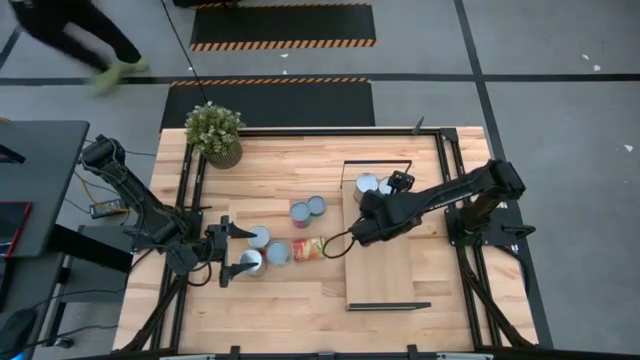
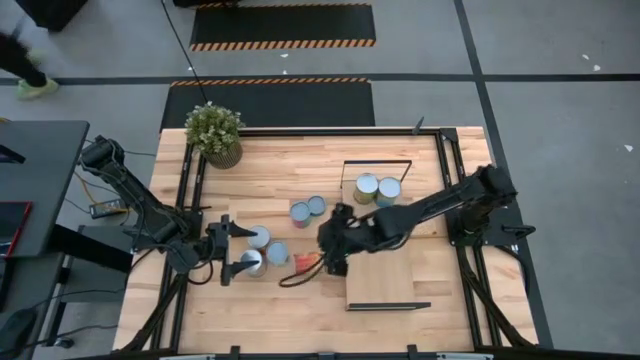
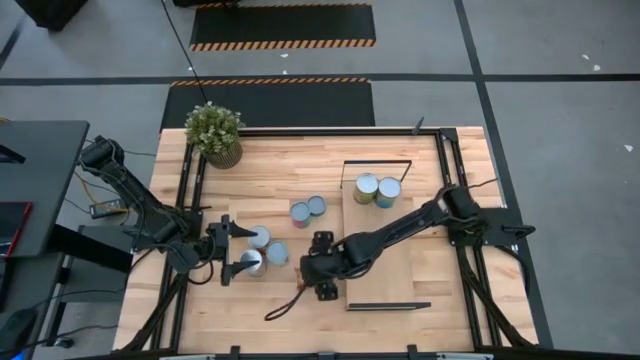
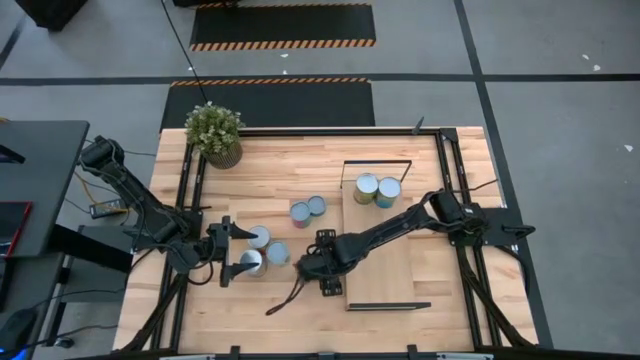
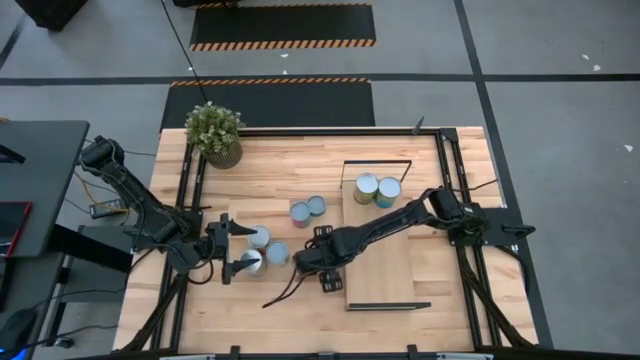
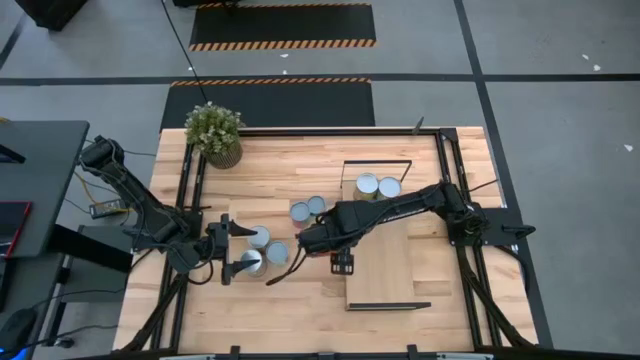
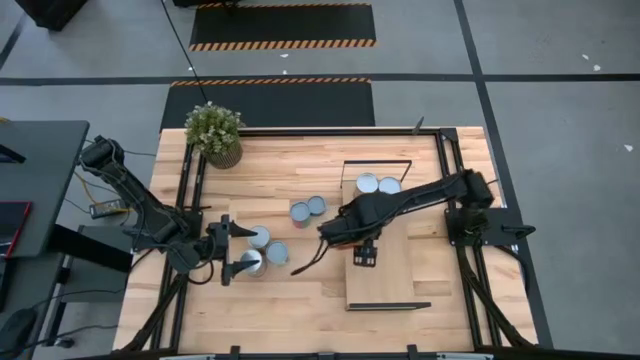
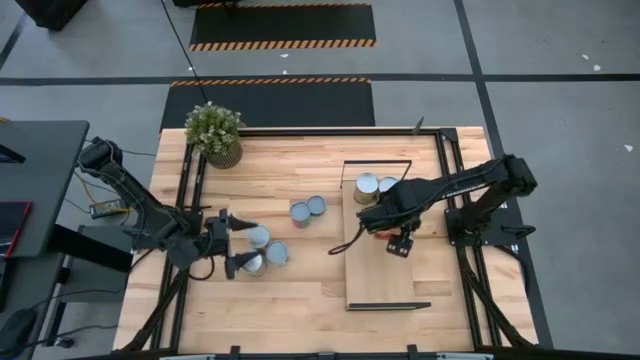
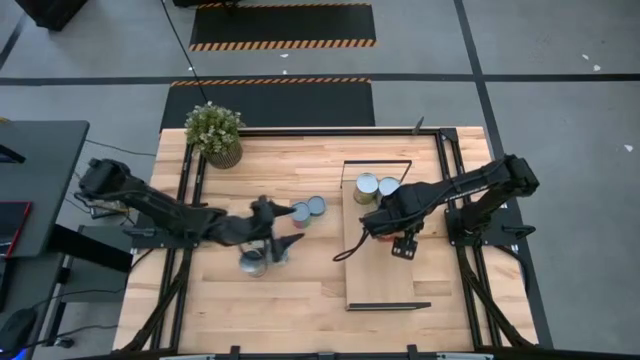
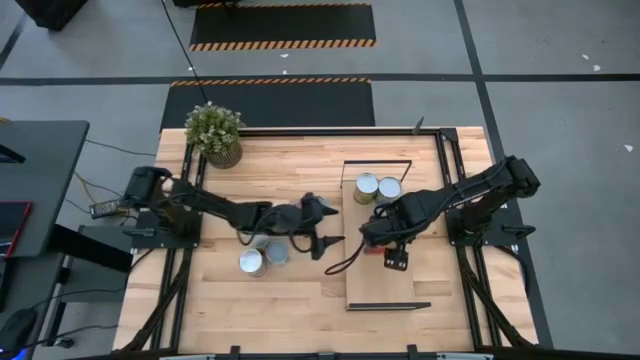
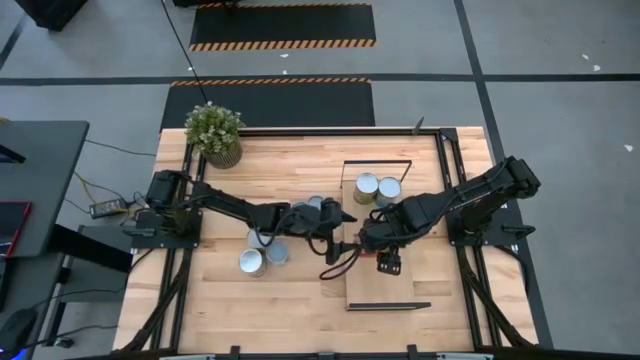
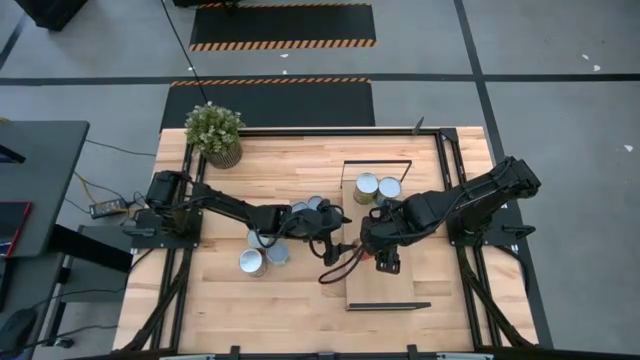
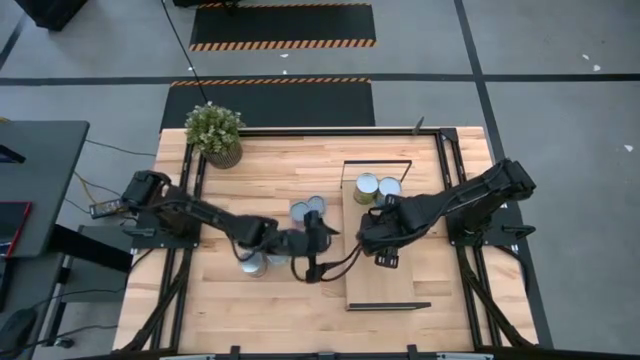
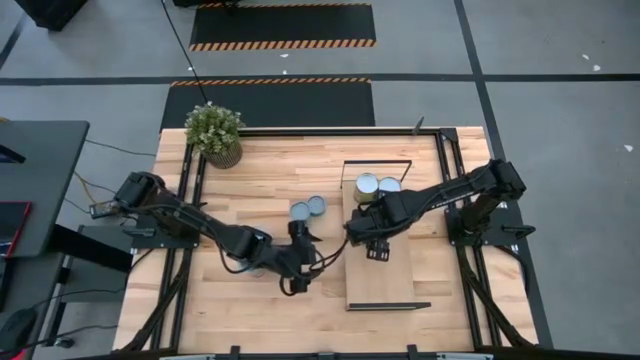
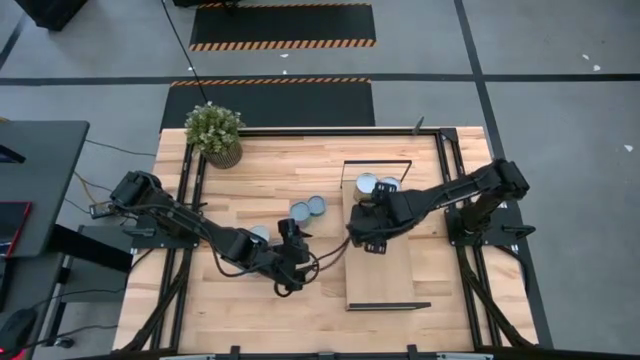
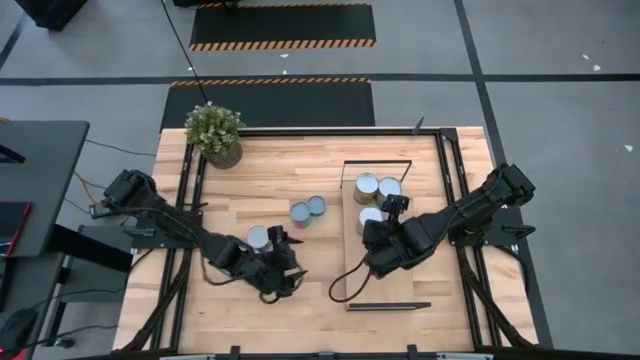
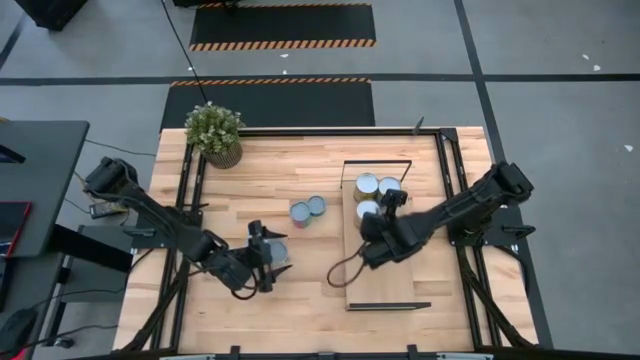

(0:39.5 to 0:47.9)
Task: Pick and place cans onto a shelf
Put the canned corn on the shelf

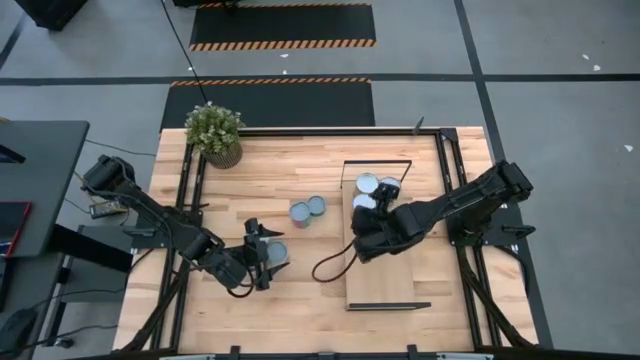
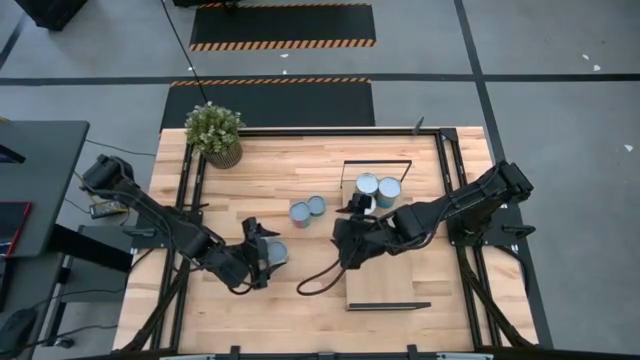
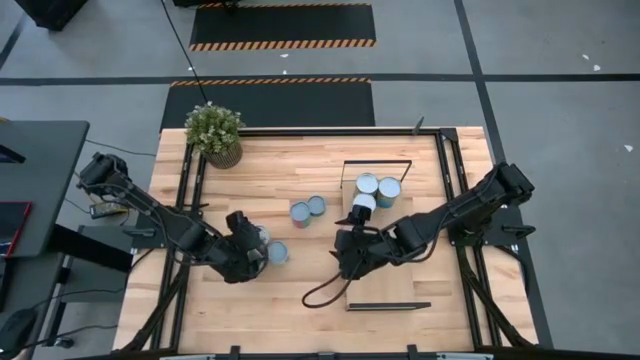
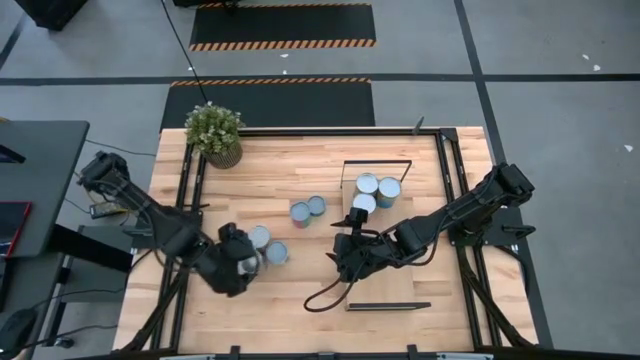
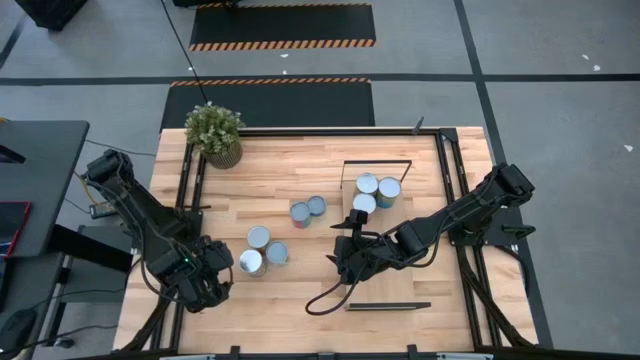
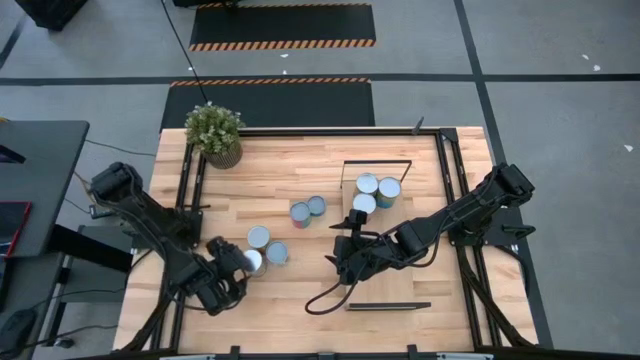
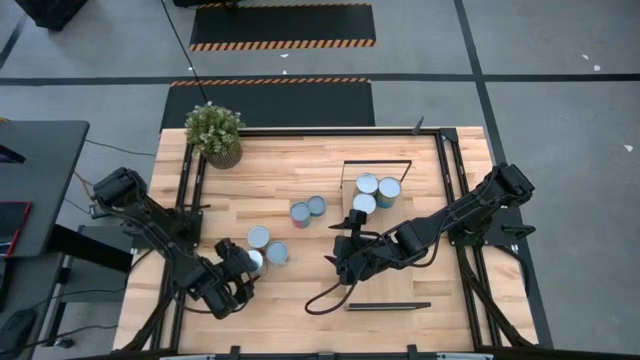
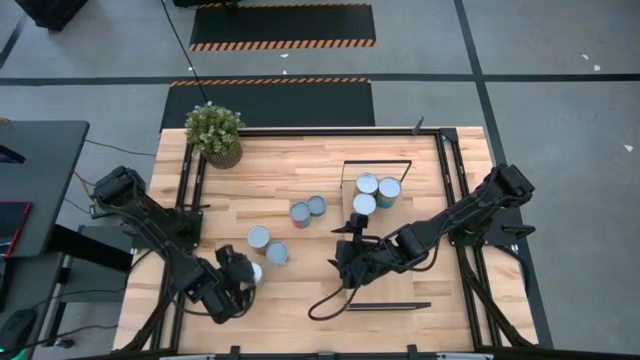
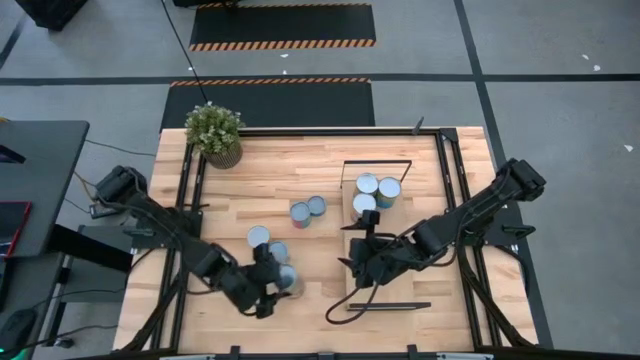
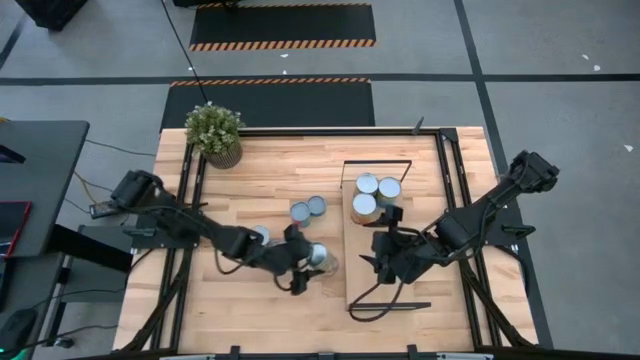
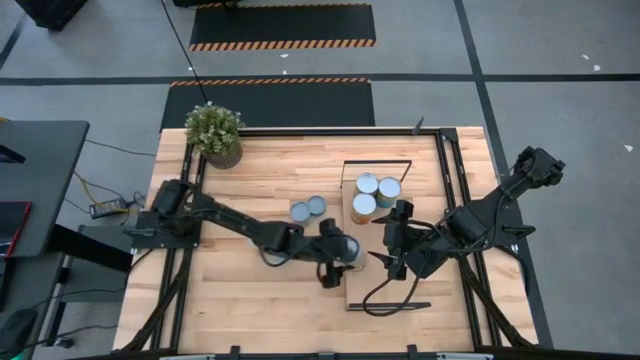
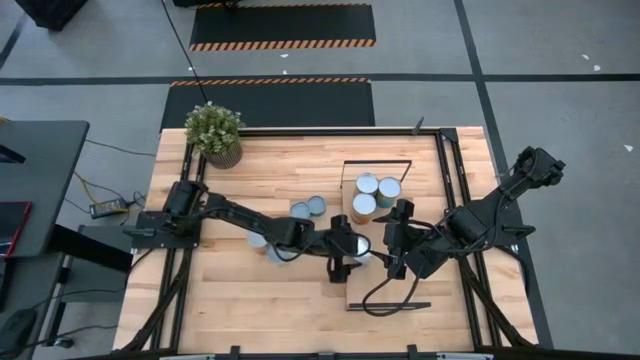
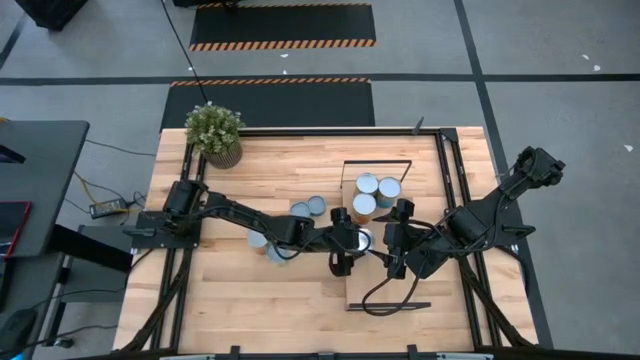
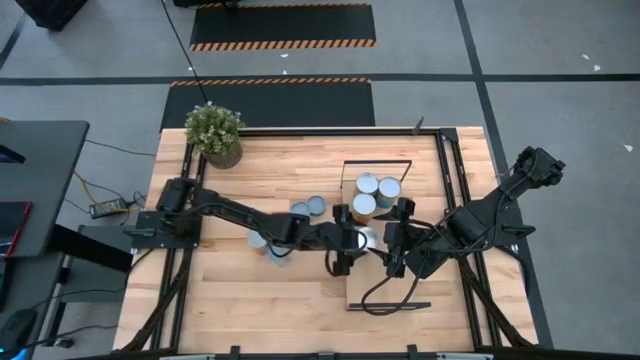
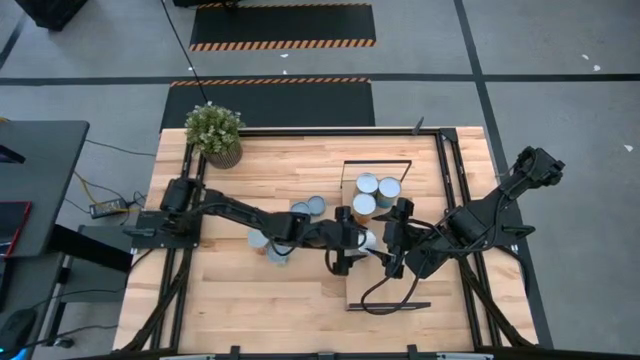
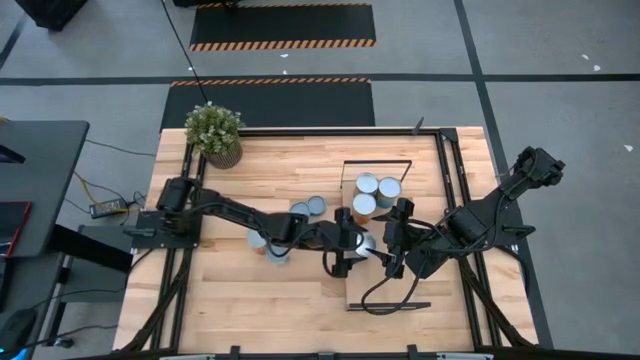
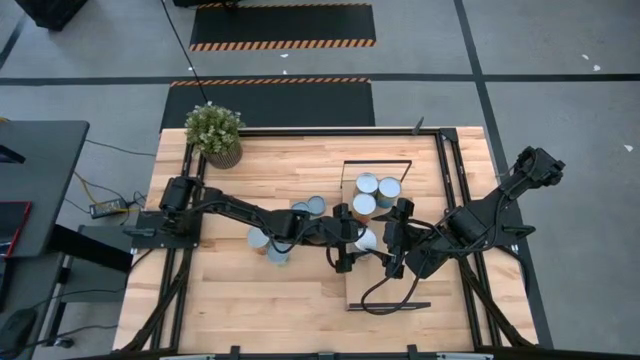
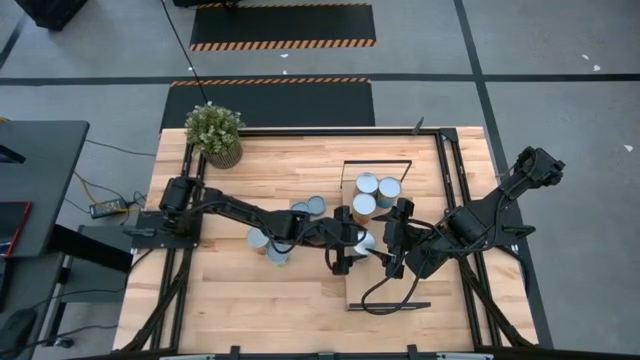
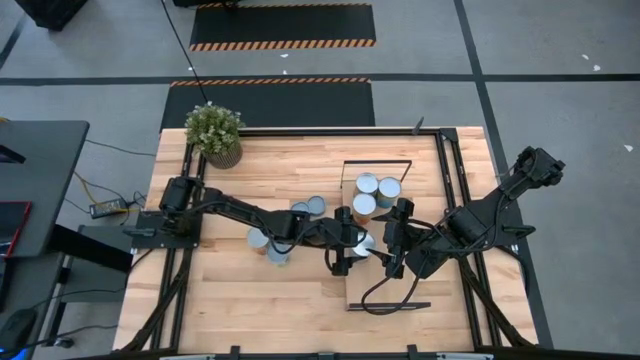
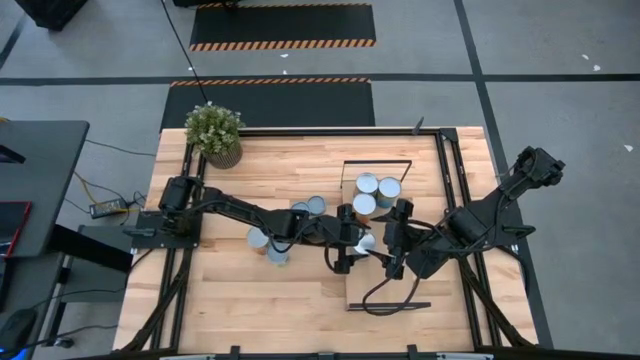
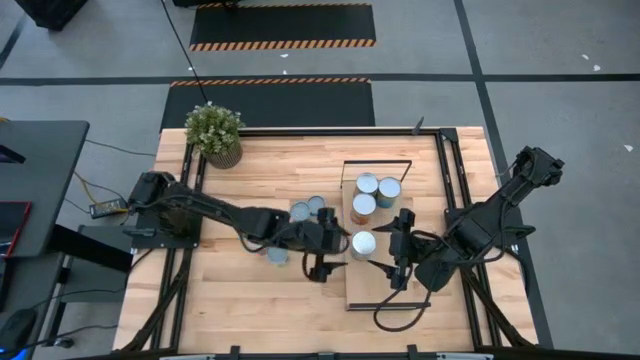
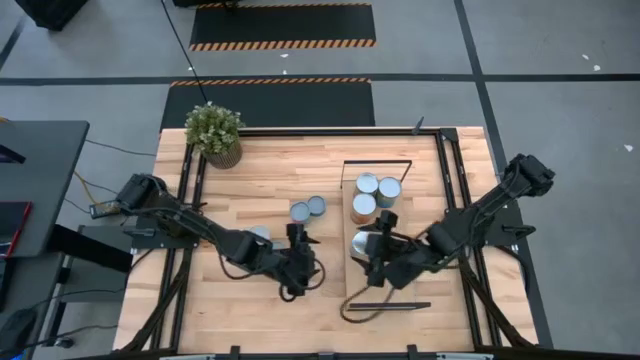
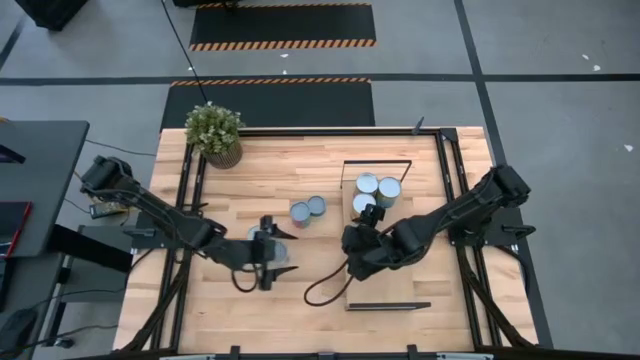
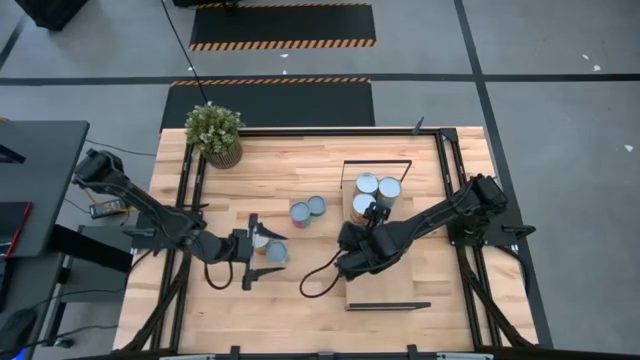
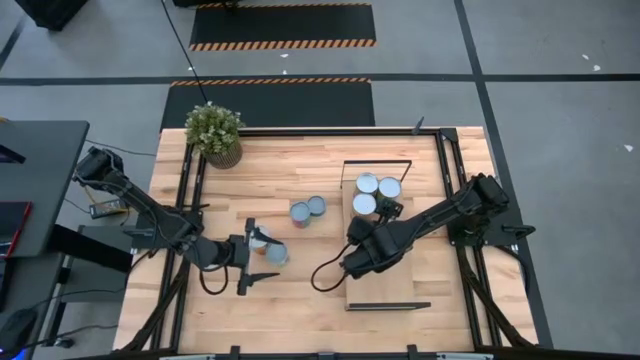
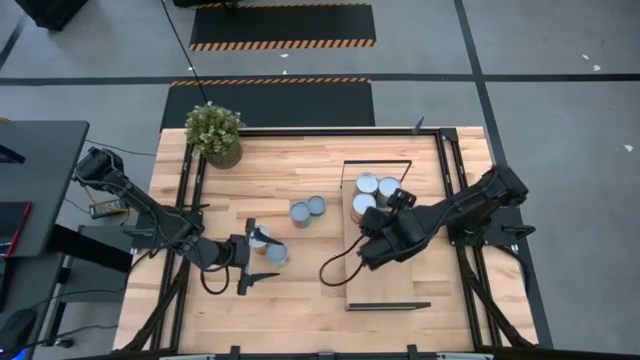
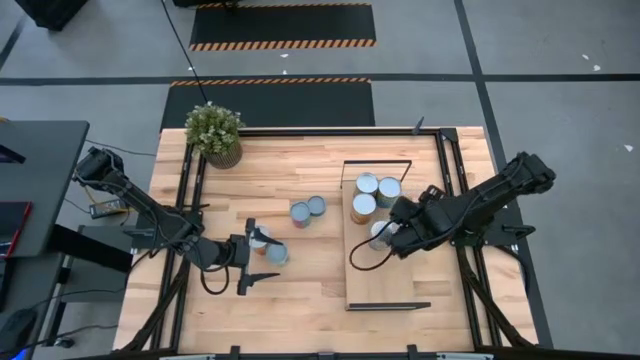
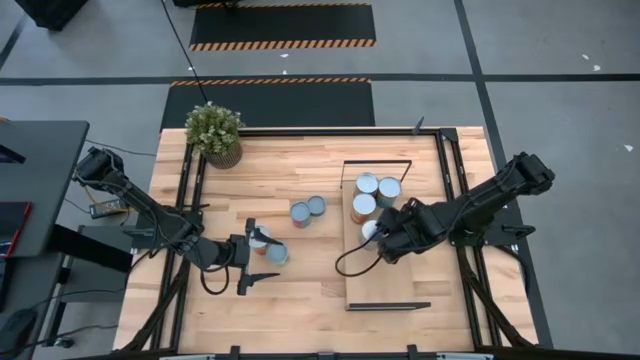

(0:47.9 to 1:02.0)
Put the canned peaches on the shelf
